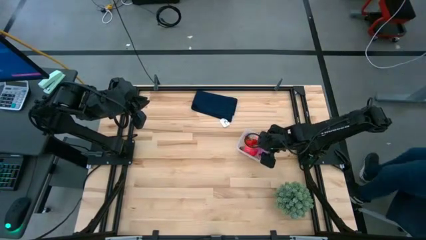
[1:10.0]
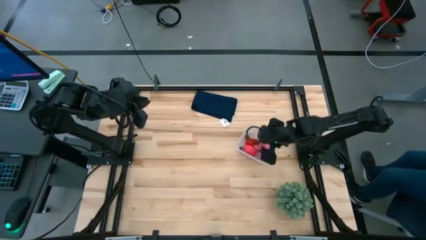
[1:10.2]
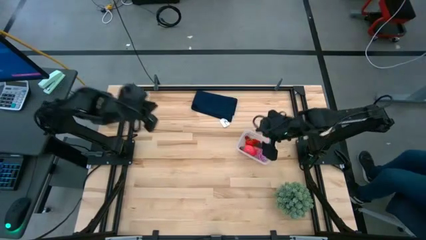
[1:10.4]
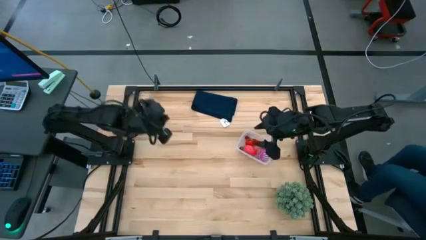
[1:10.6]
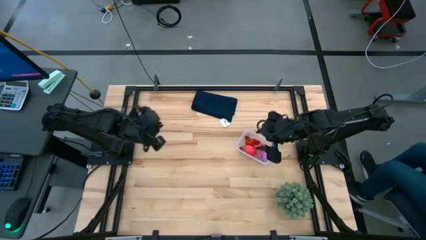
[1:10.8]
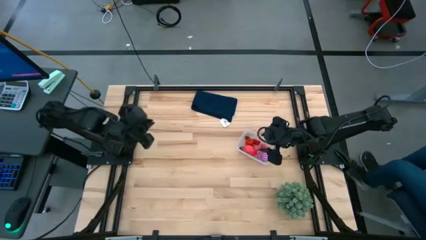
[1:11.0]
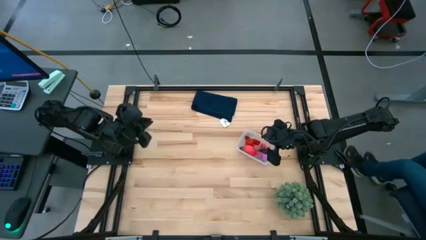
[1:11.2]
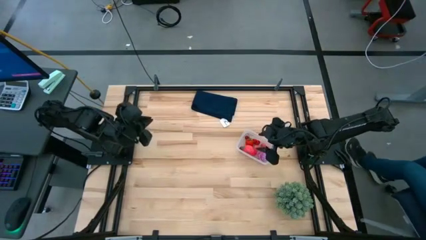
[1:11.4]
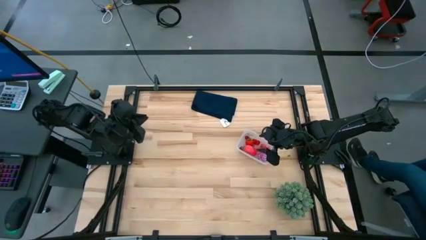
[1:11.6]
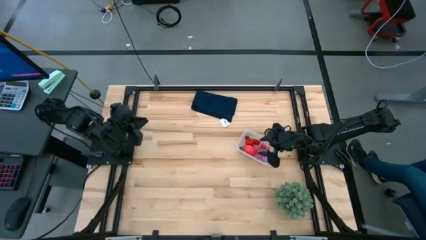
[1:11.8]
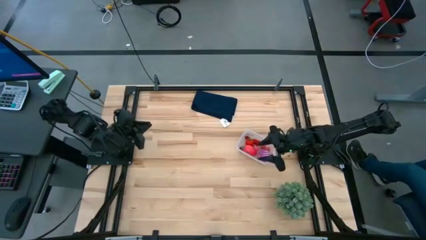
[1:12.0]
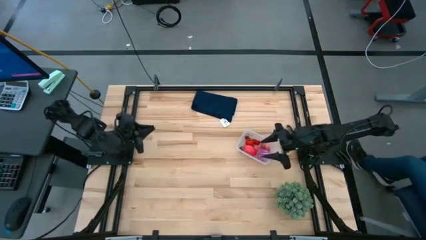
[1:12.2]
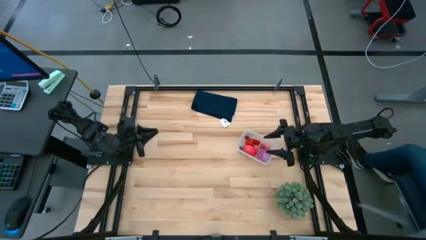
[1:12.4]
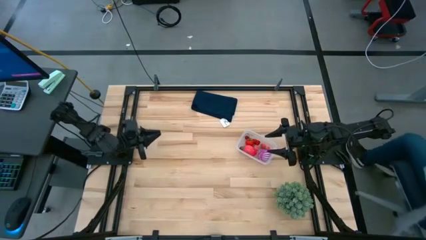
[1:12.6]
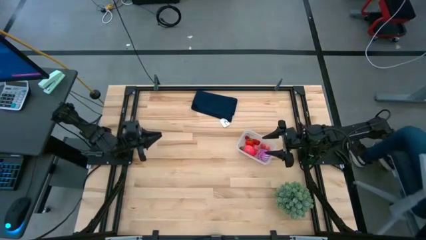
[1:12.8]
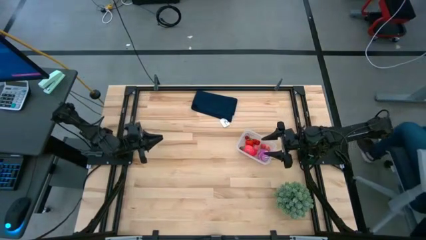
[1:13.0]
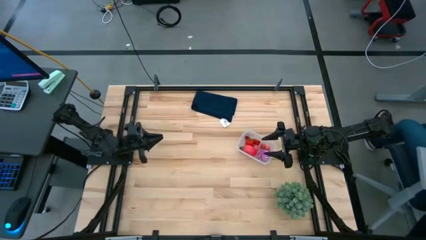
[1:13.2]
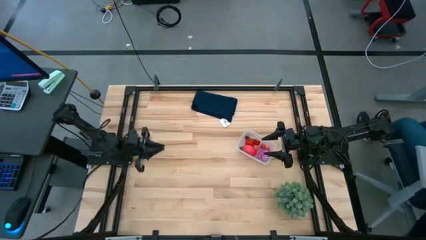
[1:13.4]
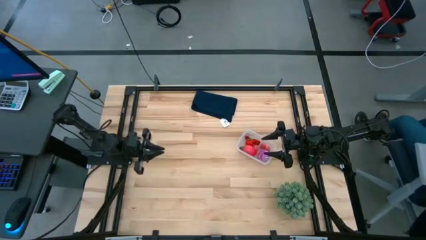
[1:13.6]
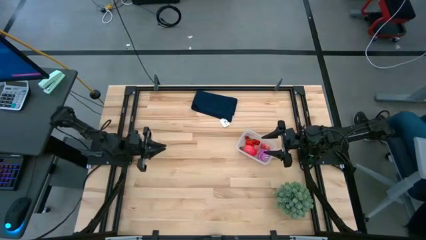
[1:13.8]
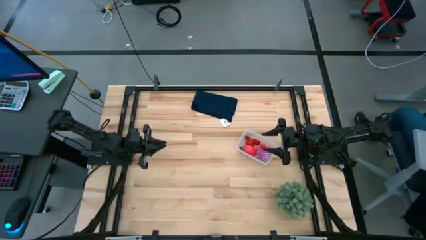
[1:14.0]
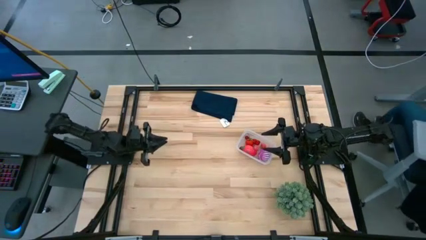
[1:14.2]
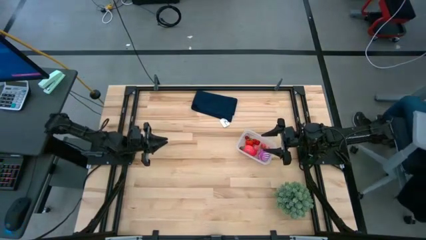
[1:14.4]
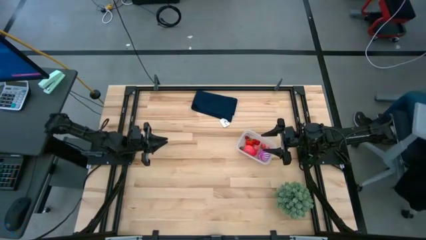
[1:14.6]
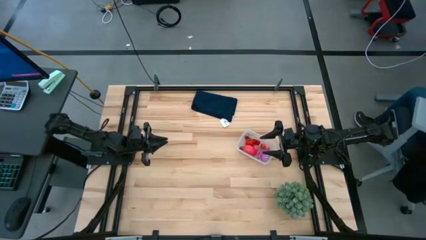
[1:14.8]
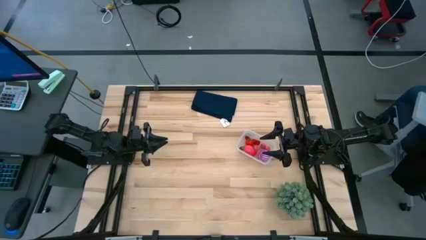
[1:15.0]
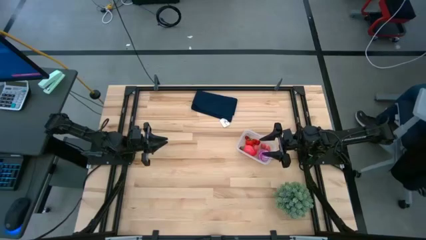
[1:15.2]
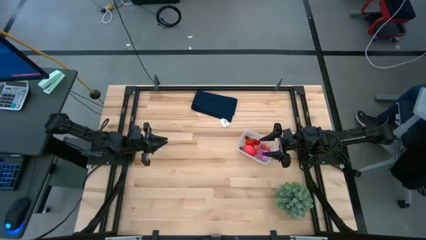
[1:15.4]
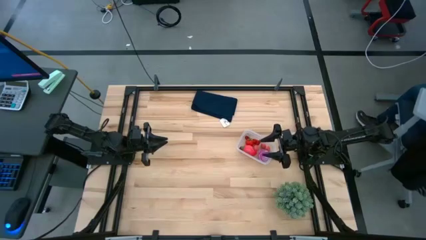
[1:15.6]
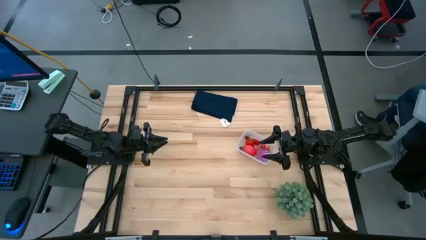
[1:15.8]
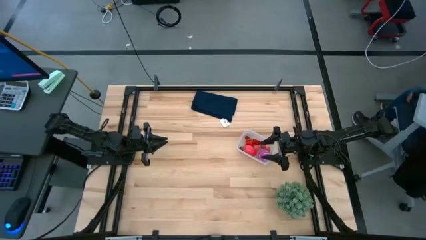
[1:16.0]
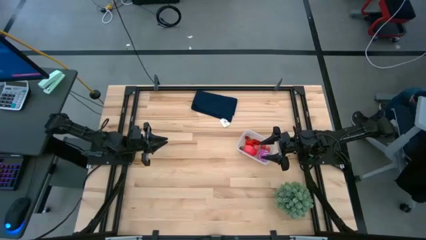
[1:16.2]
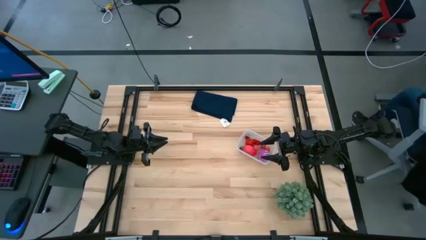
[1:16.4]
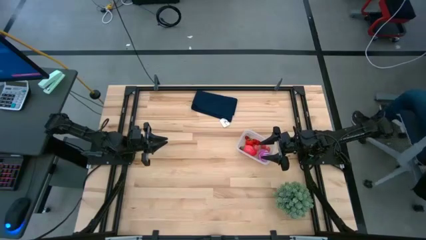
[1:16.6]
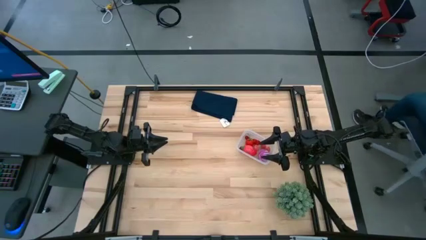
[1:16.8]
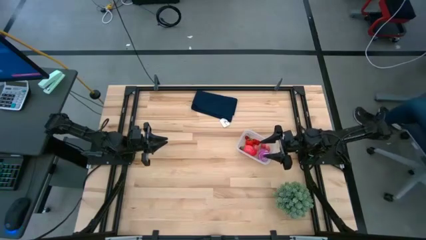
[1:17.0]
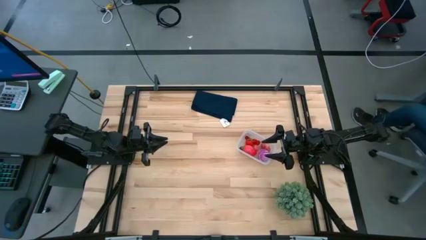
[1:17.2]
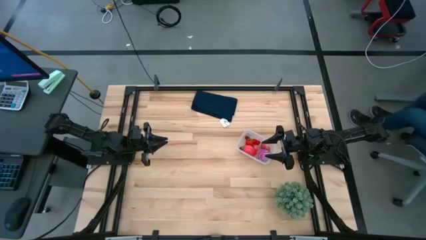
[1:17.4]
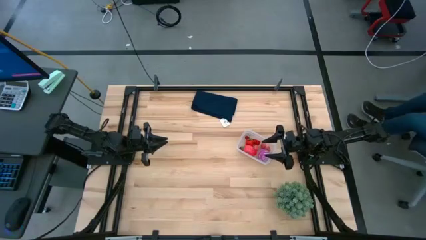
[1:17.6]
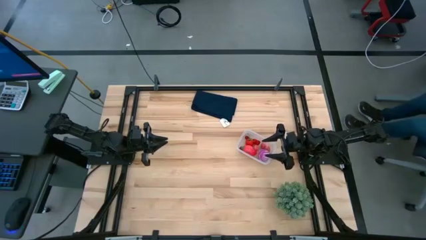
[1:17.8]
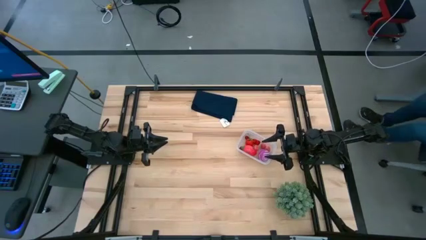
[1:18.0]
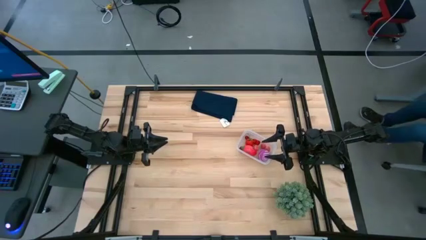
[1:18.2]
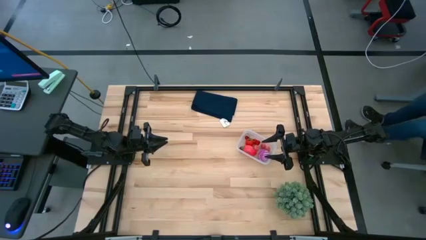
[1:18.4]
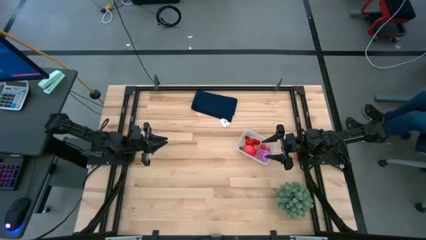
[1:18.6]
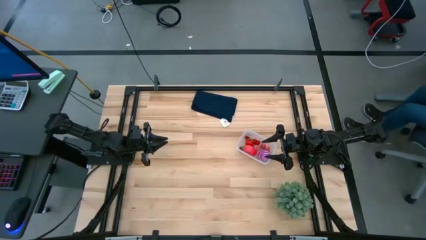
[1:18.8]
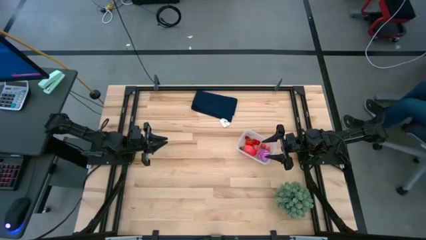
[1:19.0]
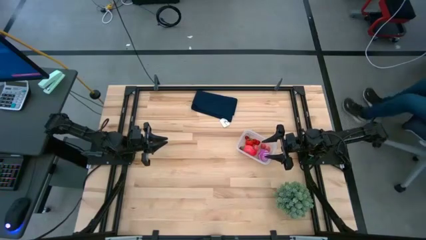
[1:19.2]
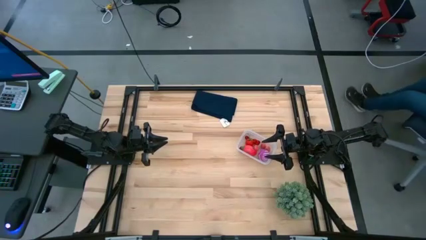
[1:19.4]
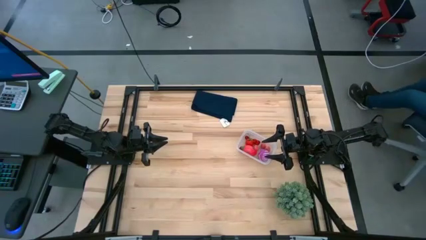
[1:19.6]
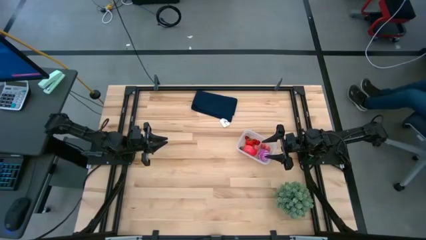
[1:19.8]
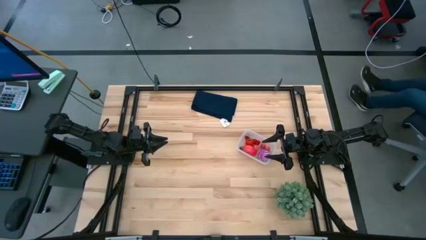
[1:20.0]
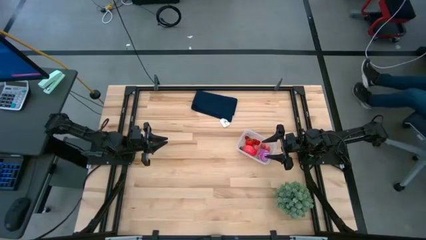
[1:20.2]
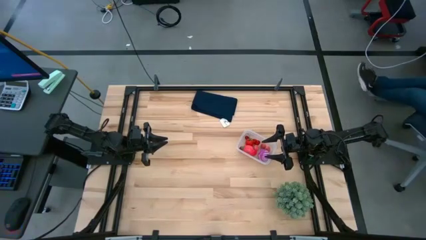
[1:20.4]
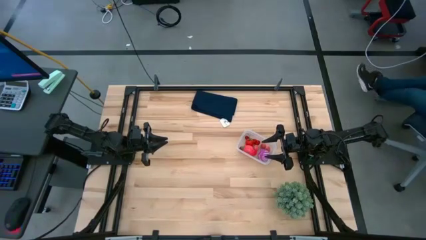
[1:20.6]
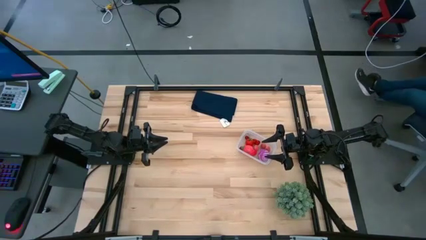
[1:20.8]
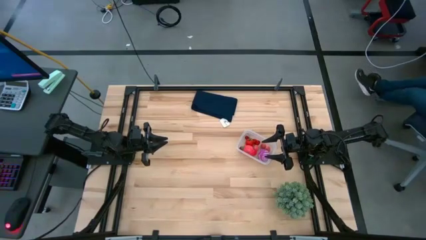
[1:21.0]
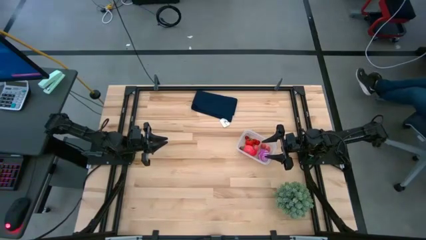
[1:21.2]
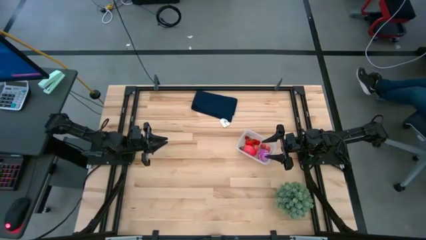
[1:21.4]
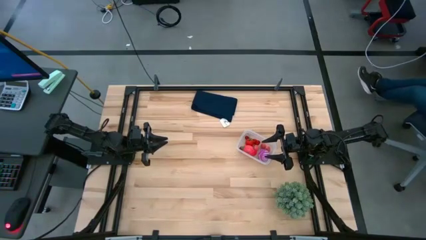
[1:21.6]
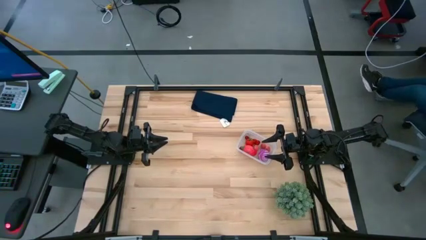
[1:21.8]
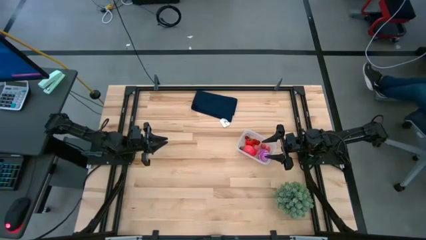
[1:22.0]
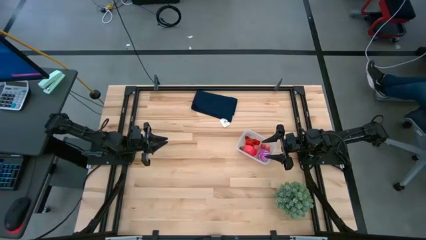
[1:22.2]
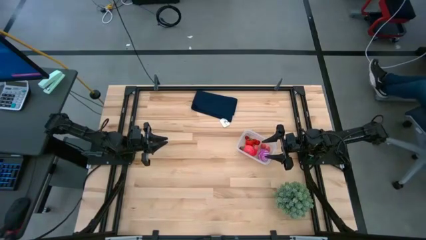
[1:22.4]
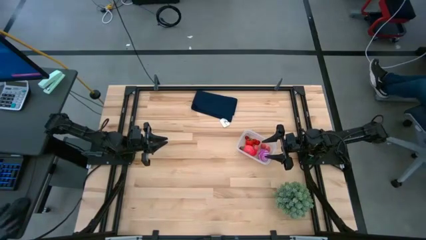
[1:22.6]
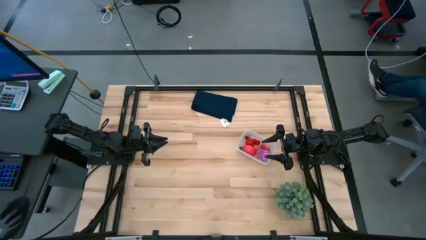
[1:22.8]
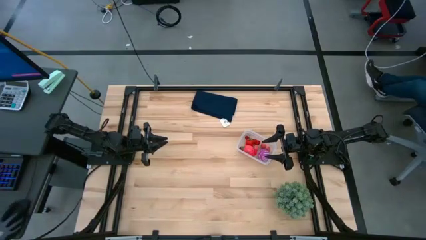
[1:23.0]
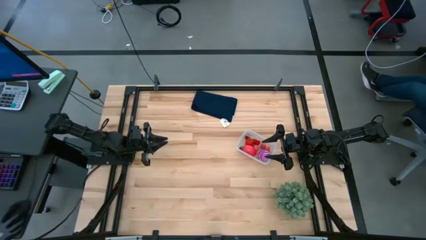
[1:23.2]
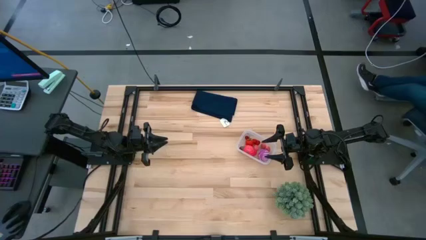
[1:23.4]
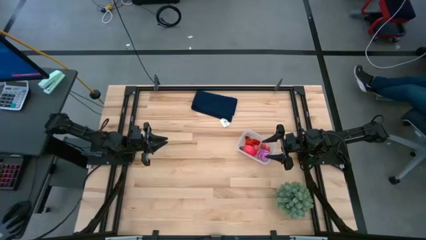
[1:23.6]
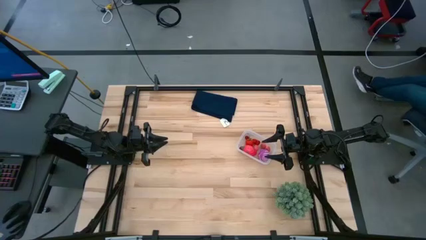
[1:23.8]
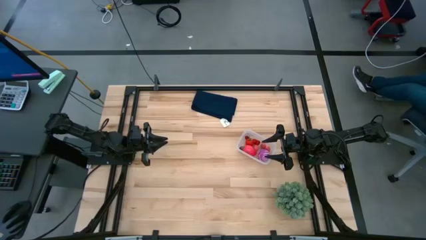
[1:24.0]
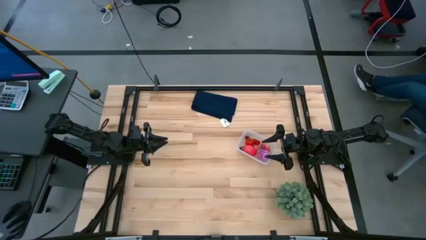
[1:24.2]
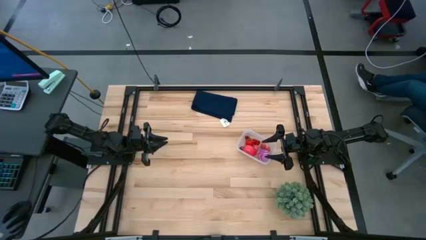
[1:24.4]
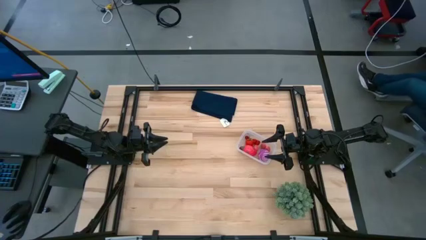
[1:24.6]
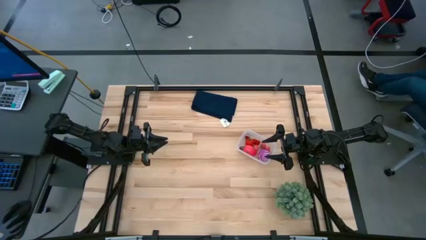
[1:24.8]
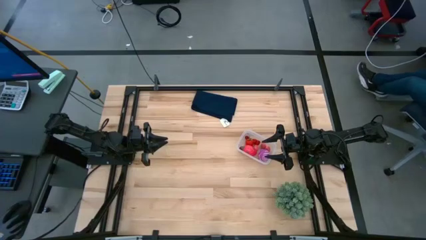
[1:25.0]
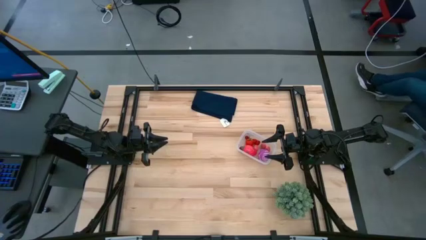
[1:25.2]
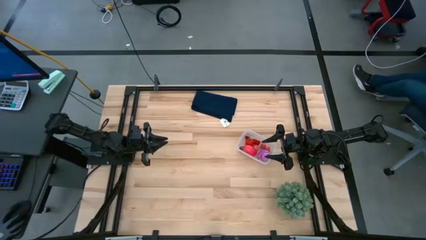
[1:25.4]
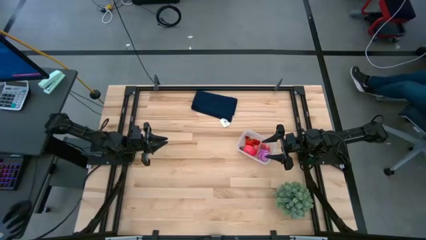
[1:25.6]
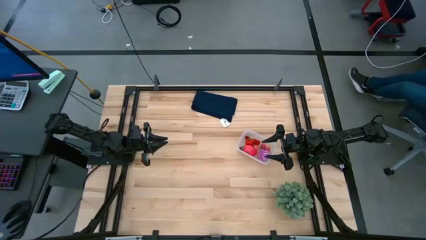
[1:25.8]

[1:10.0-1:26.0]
Task: Pick and placing Produce into tupperware
Return to Home Position

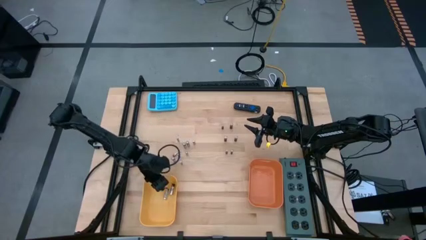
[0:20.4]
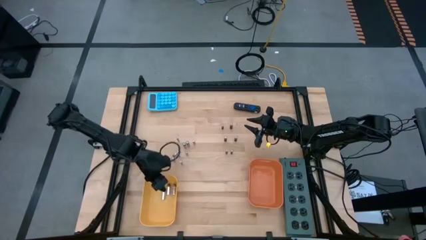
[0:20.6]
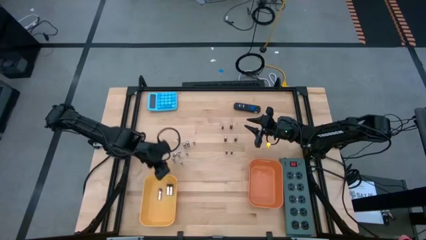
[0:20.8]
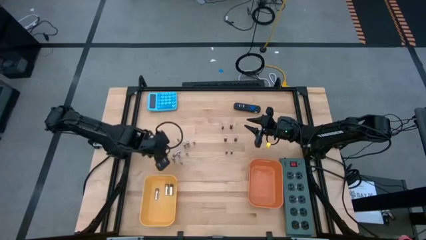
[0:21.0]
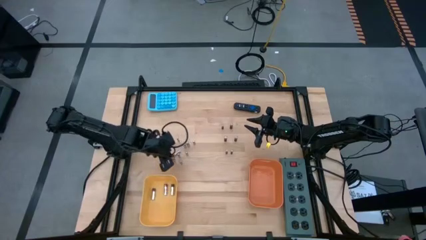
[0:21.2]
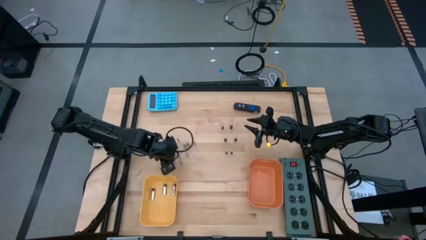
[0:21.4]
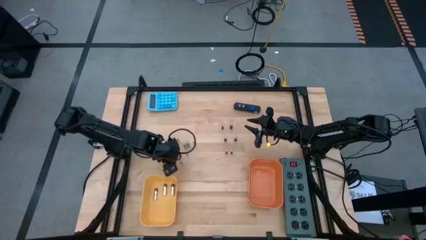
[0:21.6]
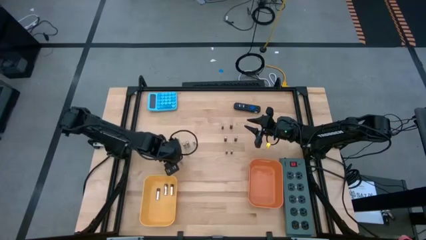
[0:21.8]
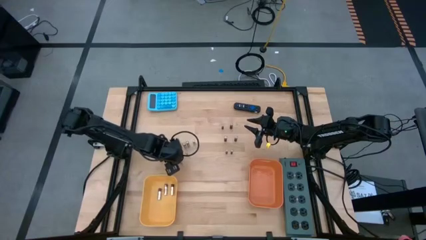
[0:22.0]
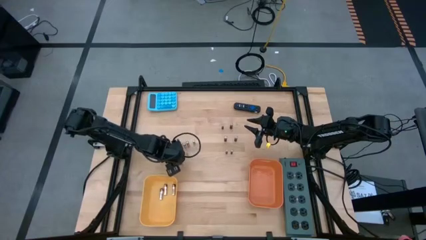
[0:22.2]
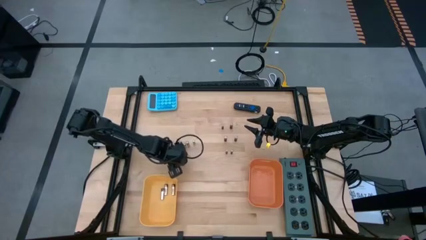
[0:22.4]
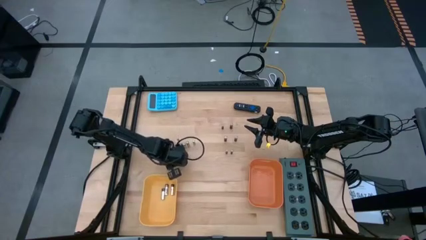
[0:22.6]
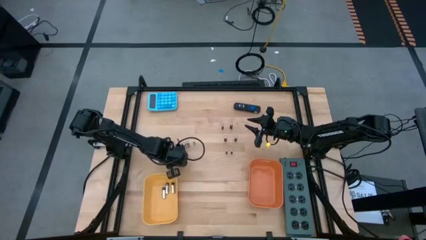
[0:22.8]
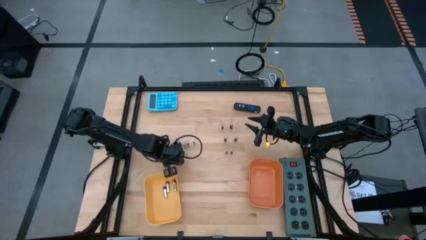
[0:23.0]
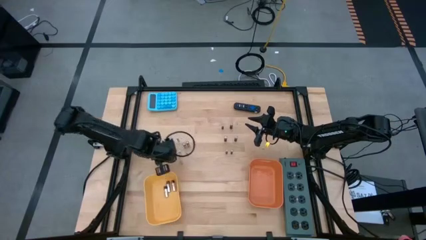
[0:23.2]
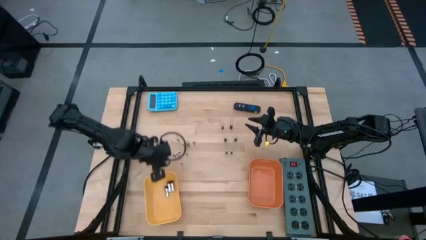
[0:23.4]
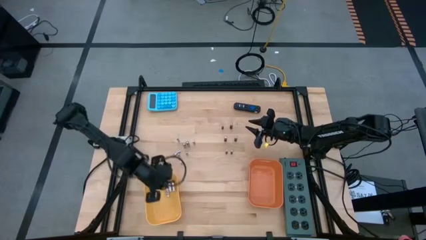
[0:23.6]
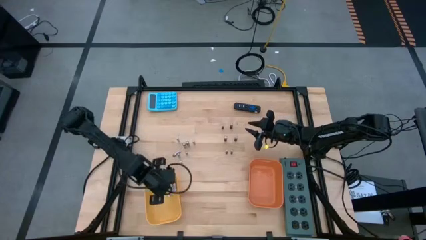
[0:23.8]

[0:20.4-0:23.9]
Task: Sort batteries
Put the silver battery into the yellow bin
